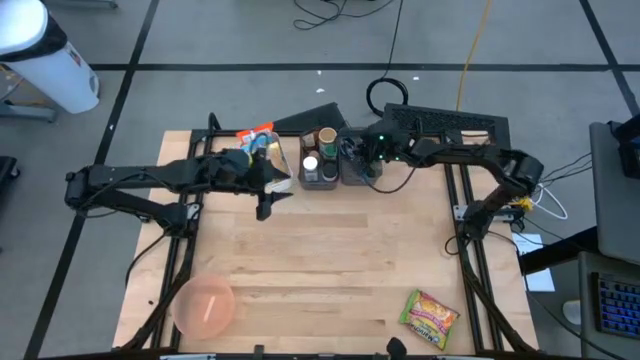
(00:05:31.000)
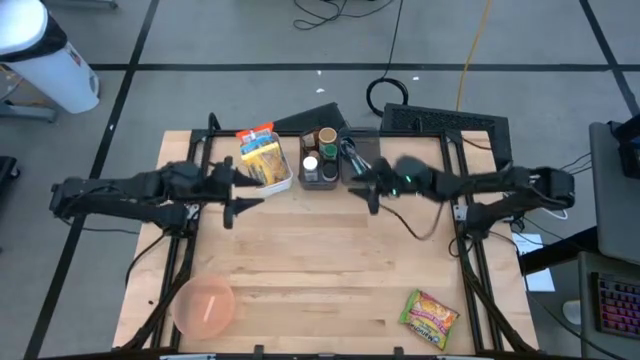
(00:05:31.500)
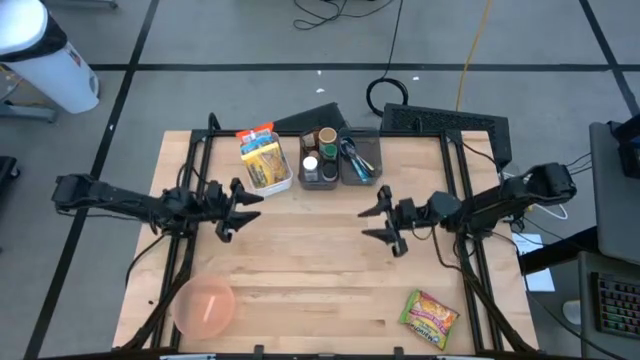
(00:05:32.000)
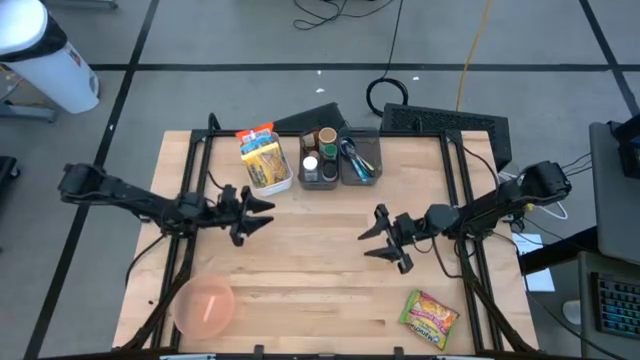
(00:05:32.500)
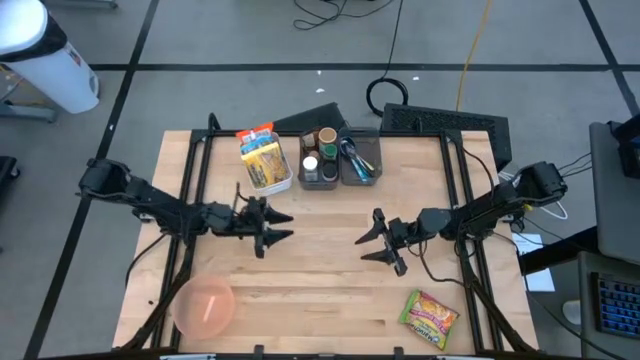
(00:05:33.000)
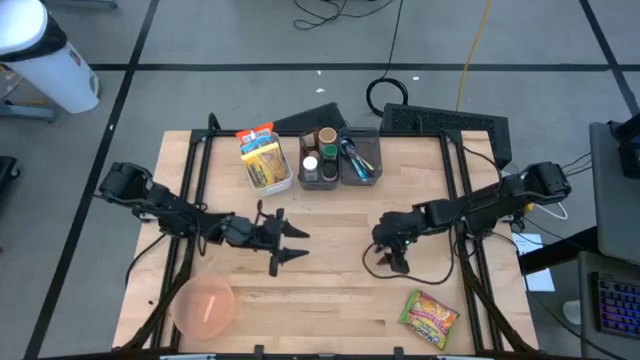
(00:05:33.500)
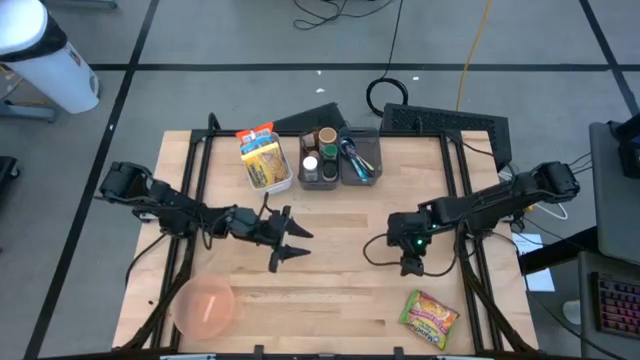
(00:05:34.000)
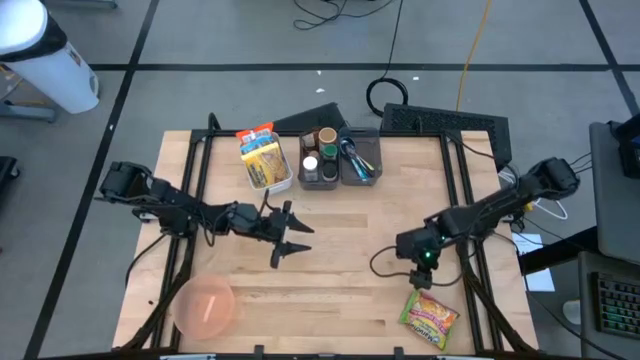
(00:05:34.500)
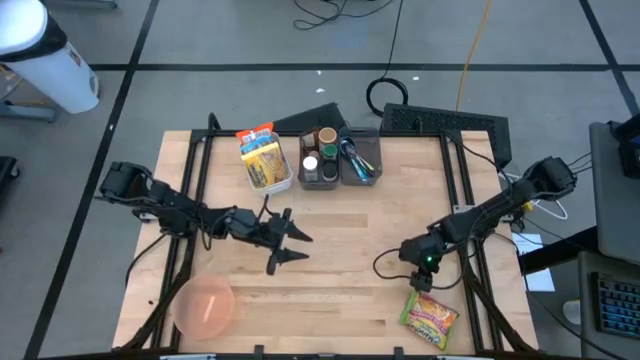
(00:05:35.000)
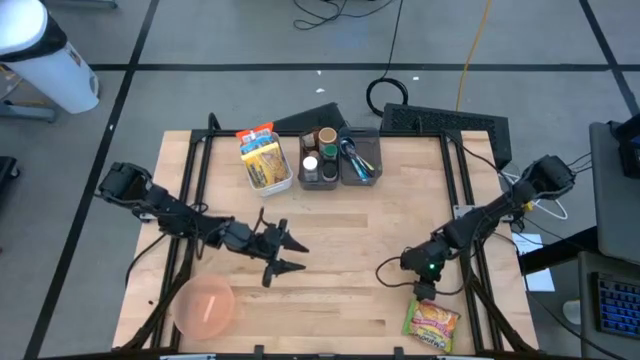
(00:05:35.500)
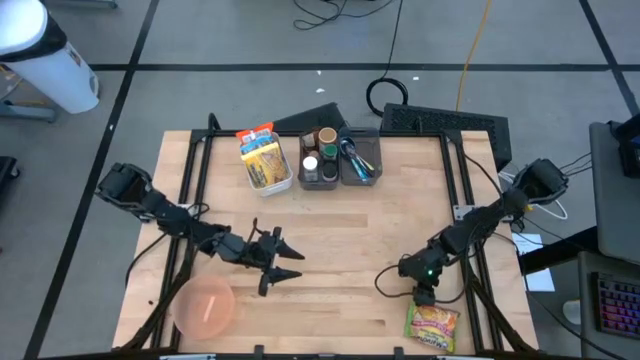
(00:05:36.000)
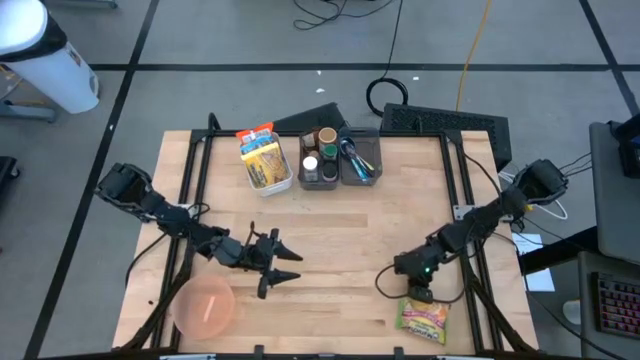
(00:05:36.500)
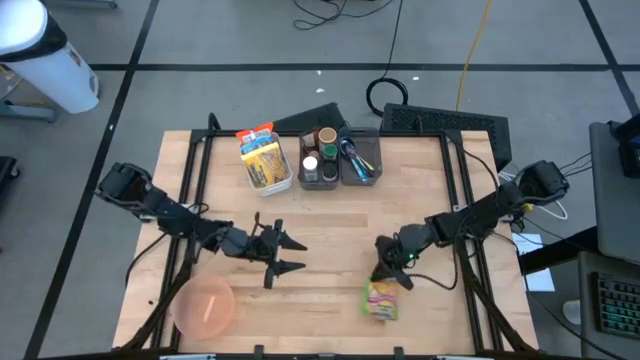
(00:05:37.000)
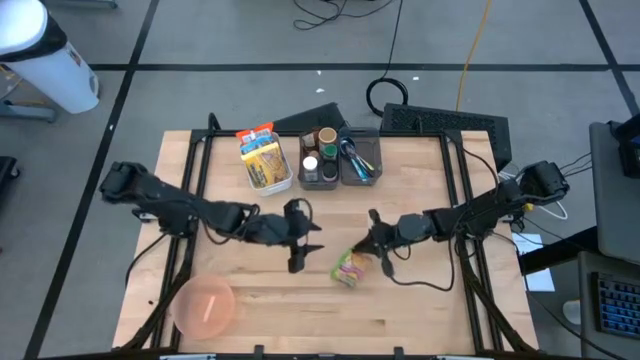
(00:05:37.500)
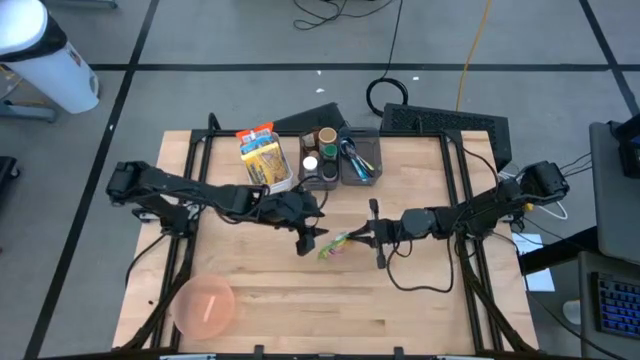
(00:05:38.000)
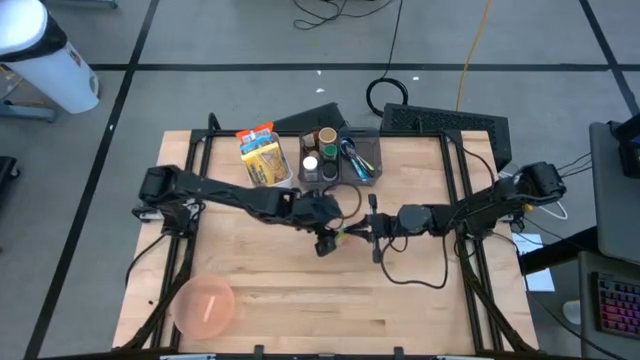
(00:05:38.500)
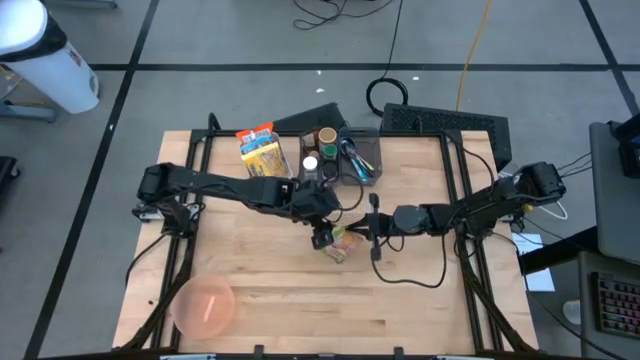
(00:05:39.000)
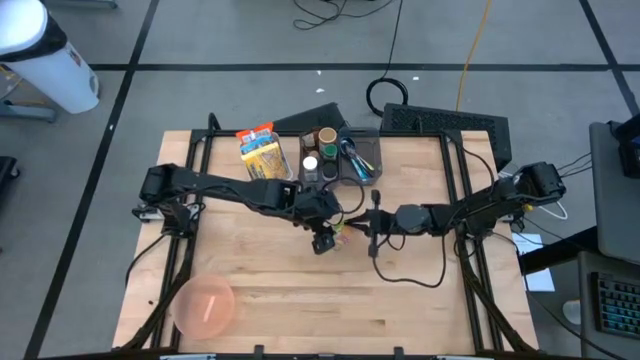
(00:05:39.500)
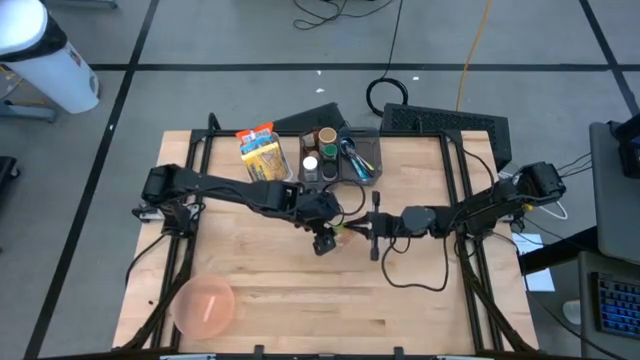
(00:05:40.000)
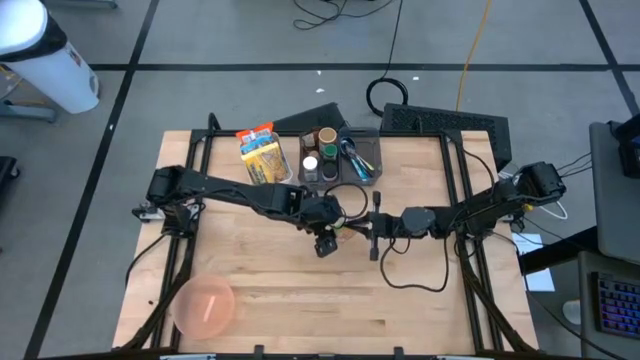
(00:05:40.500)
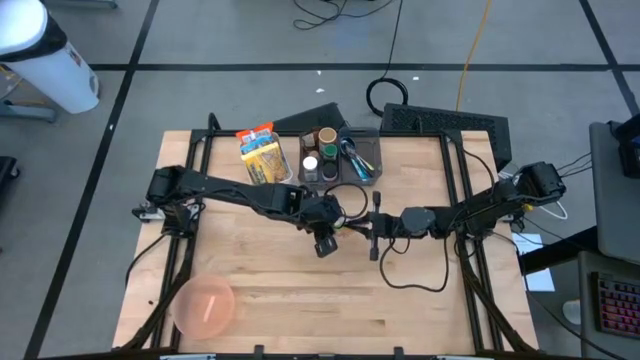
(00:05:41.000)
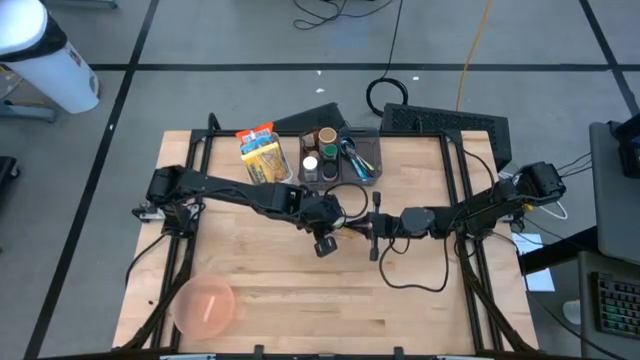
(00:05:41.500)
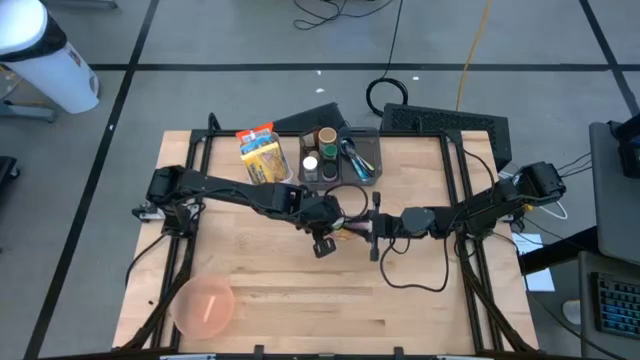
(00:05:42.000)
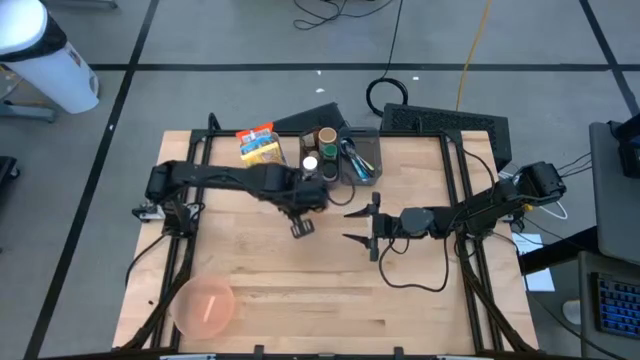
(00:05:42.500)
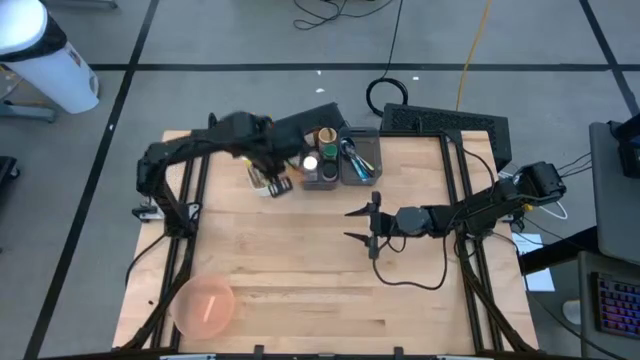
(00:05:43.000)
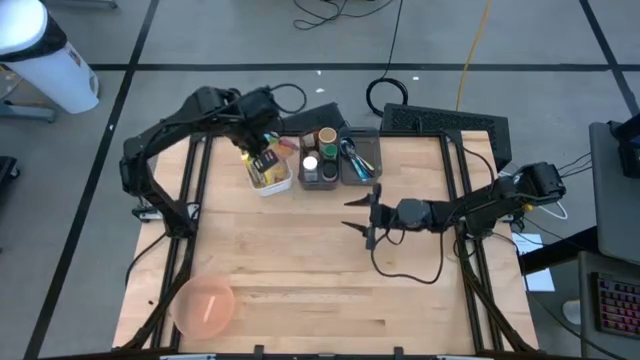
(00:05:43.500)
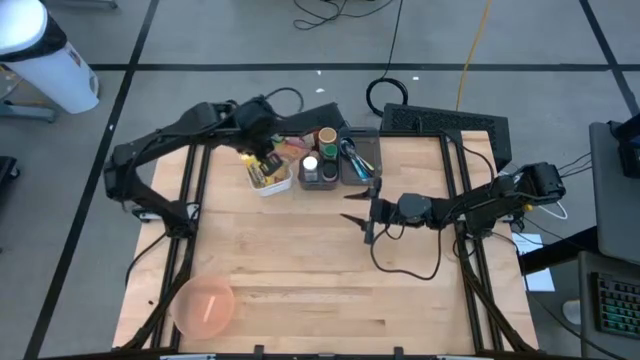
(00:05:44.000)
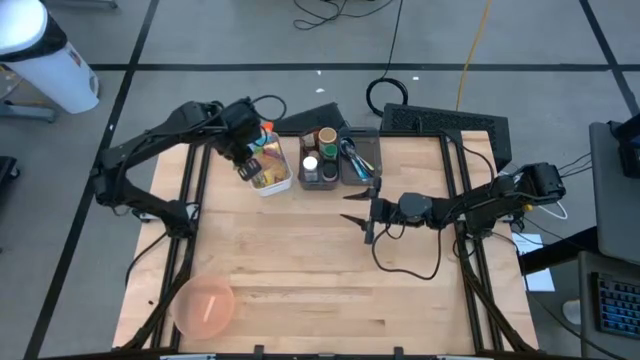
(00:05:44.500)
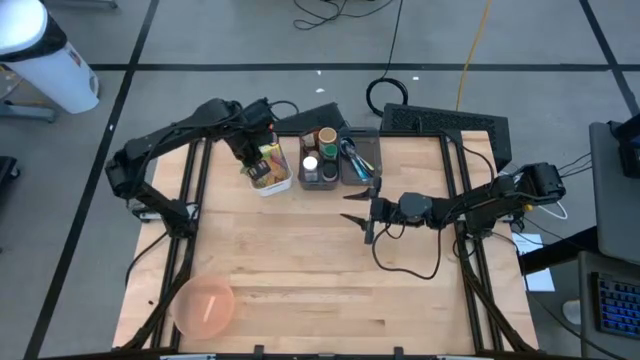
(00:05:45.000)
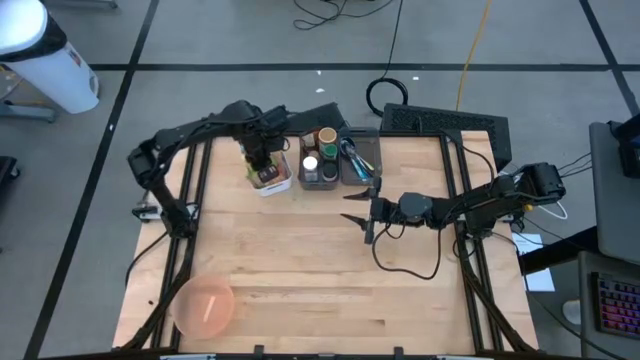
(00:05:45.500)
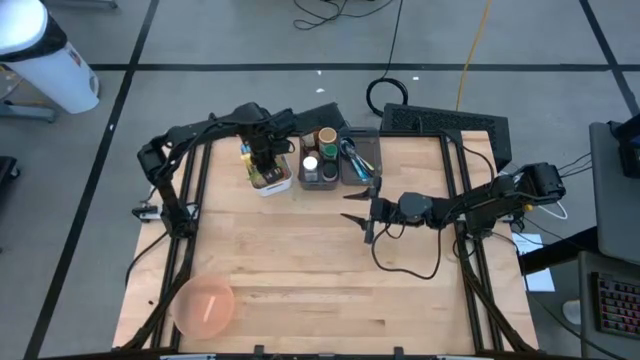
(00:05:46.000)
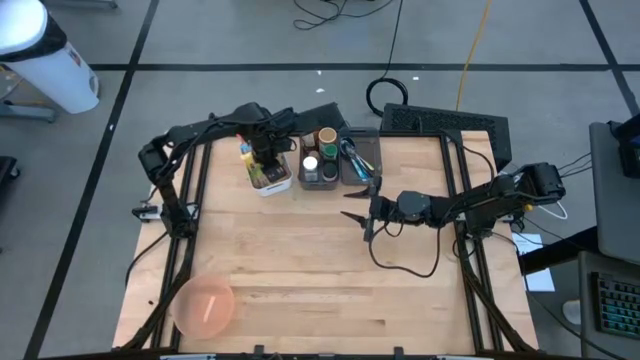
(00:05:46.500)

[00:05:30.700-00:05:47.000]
Task: Pick & Place Food Item
Put the green noodle pack into the white bin

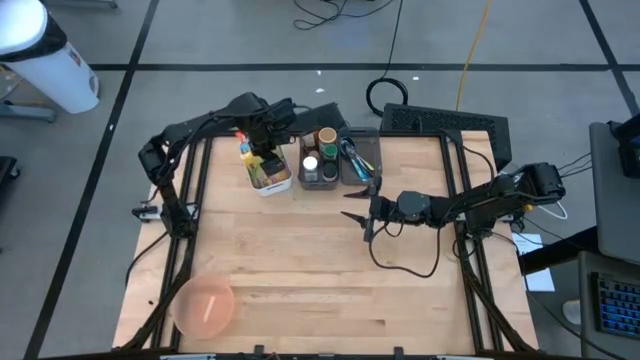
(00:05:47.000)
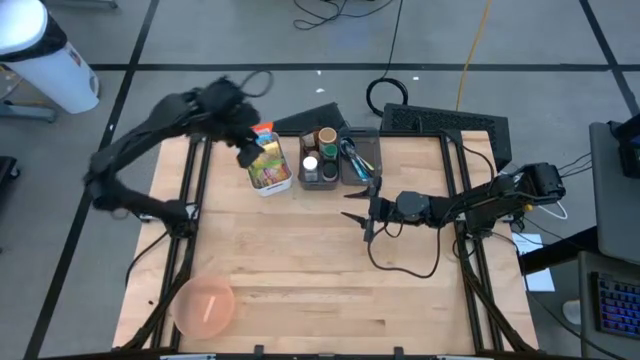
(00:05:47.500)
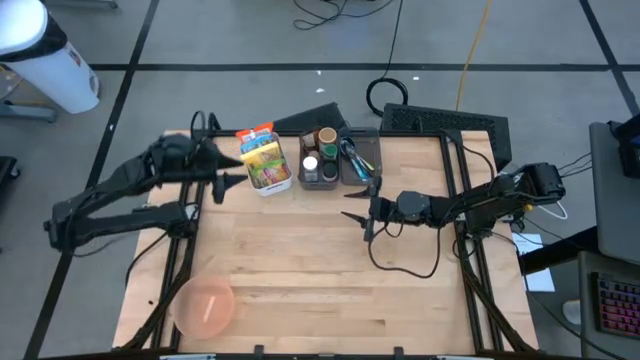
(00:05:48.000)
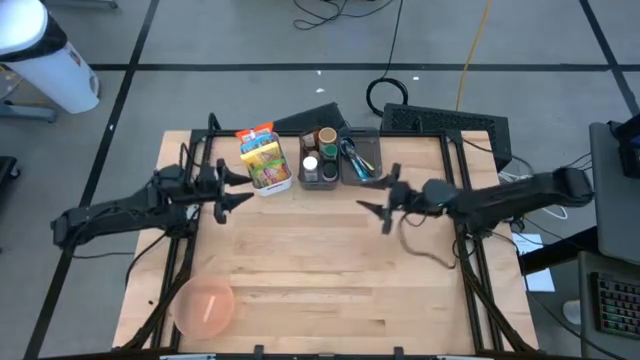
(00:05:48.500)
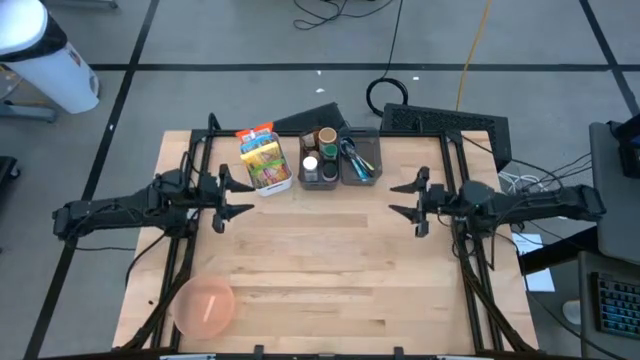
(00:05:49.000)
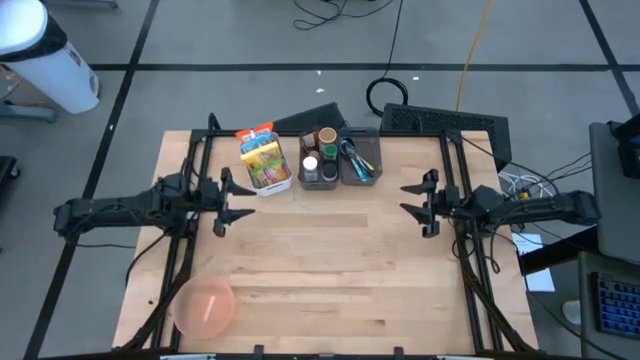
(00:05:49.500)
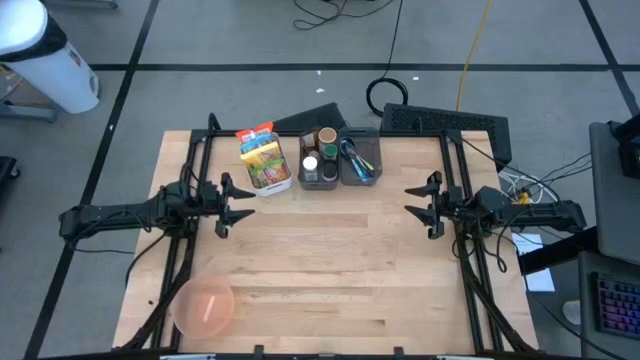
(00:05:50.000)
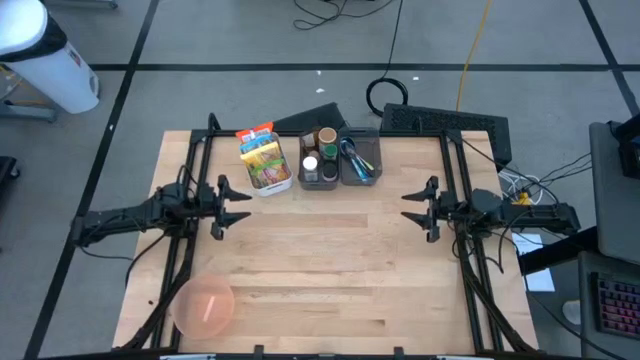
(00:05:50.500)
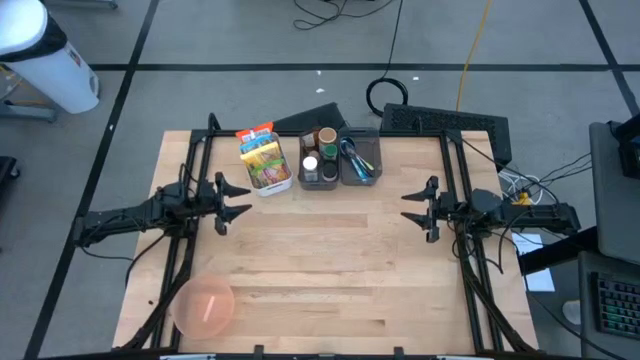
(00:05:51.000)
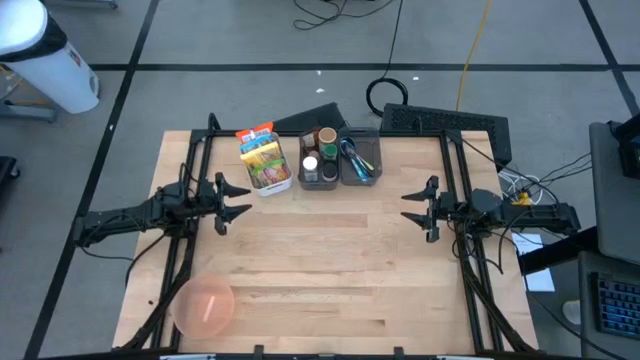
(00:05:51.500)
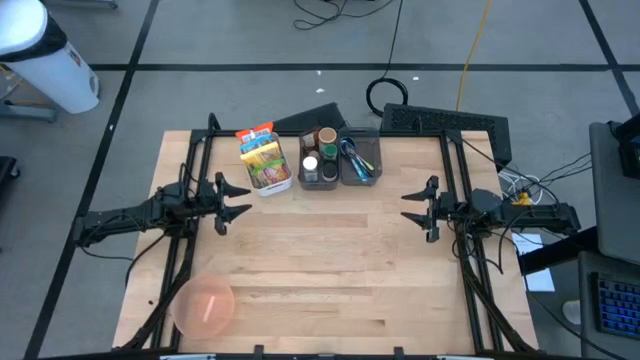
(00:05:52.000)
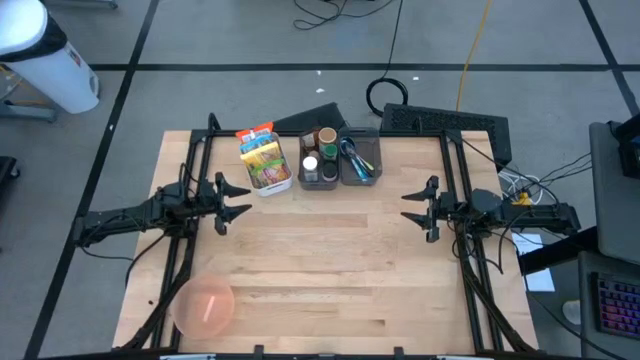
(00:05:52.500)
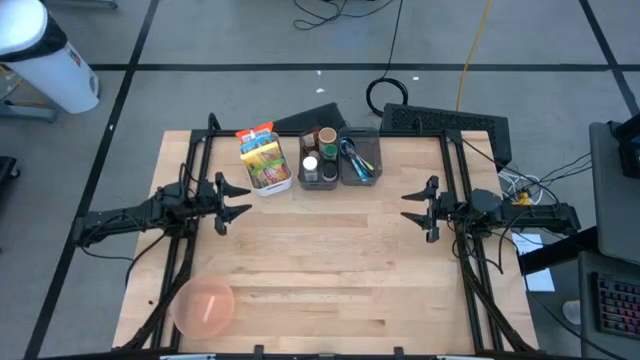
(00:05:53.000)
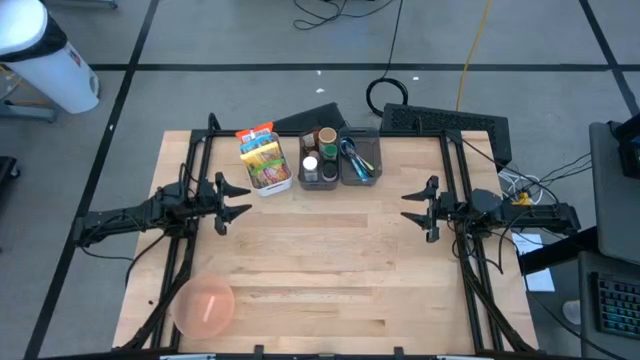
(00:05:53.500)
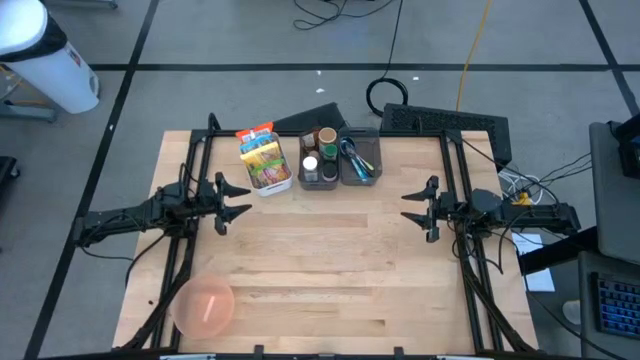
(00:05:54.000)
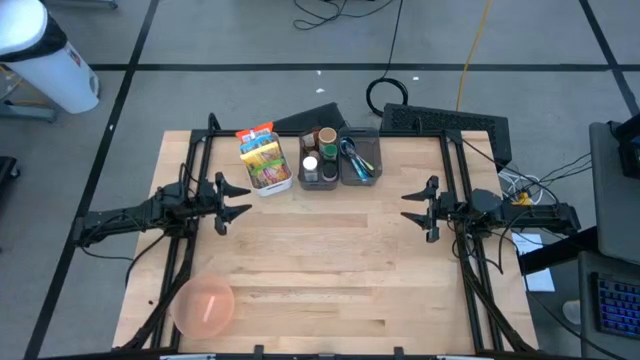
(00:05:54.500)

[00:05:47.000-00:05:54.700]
Return to Home Position
